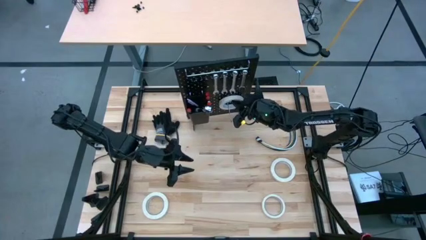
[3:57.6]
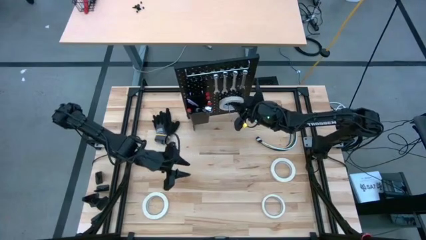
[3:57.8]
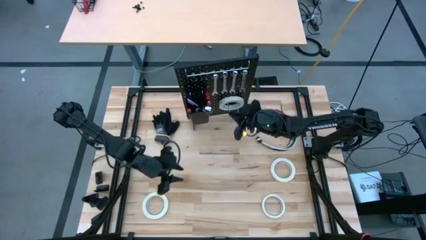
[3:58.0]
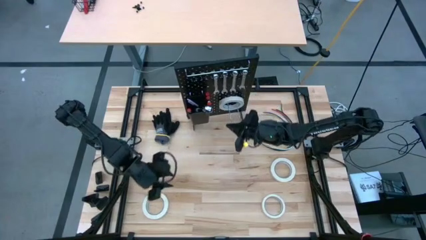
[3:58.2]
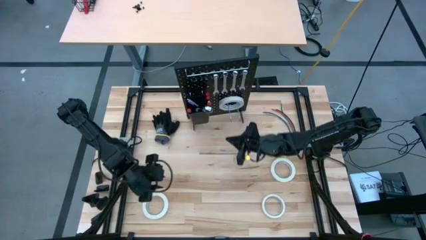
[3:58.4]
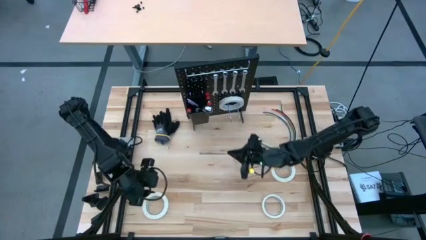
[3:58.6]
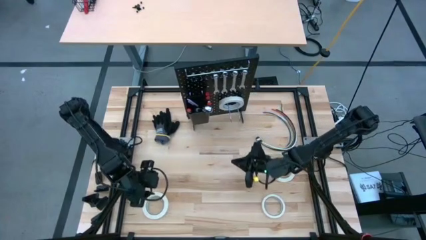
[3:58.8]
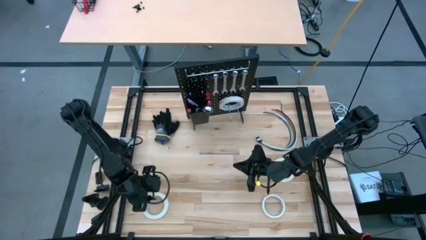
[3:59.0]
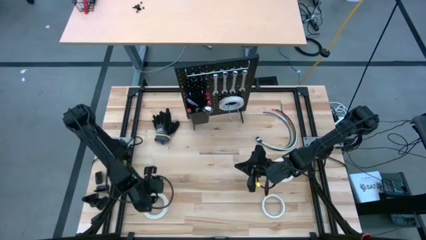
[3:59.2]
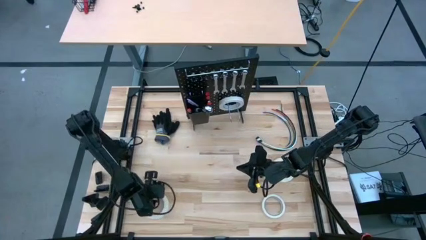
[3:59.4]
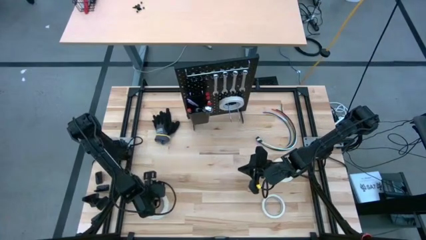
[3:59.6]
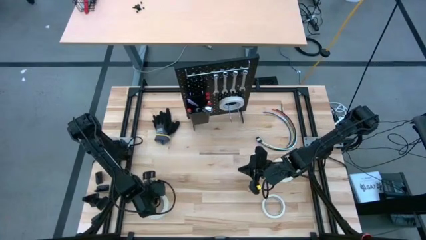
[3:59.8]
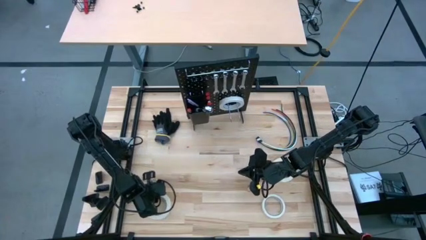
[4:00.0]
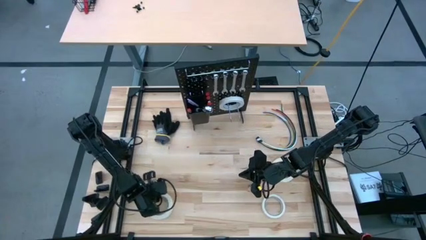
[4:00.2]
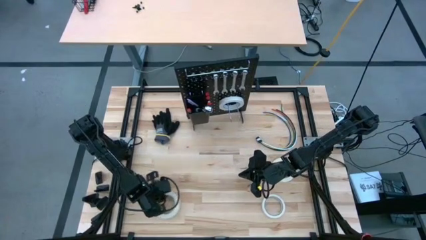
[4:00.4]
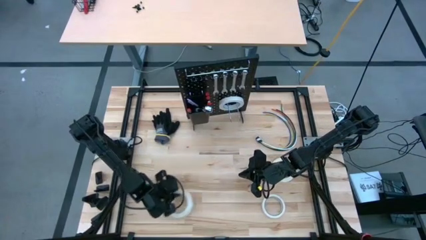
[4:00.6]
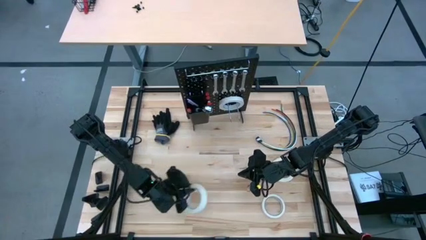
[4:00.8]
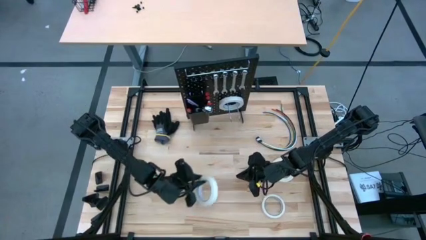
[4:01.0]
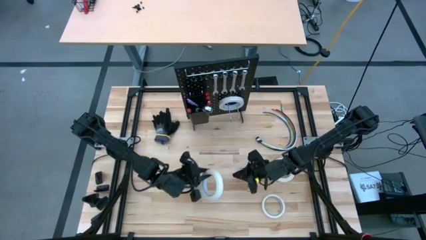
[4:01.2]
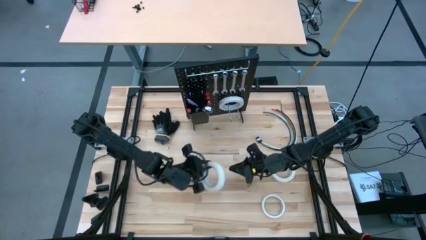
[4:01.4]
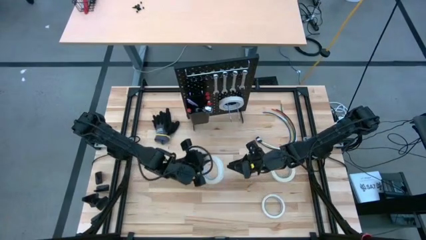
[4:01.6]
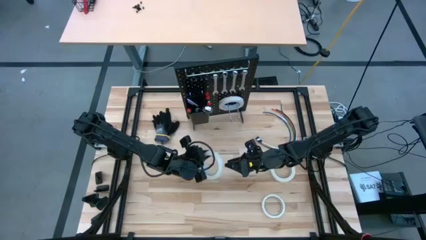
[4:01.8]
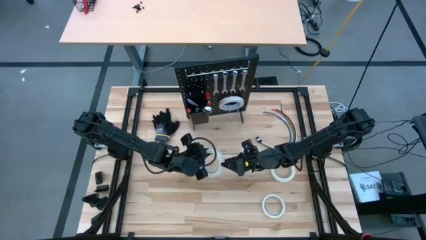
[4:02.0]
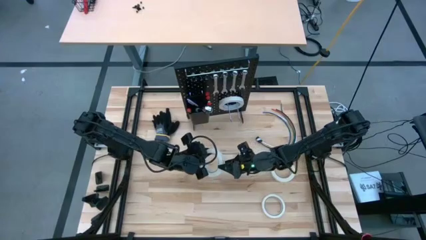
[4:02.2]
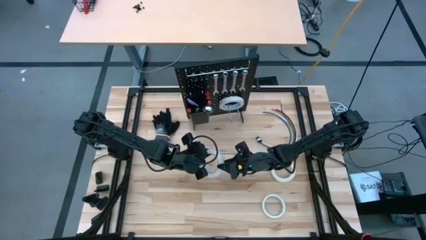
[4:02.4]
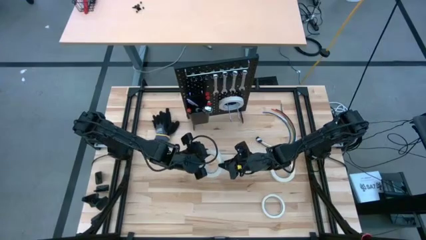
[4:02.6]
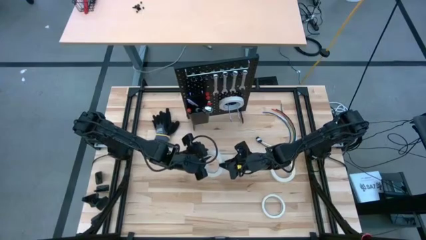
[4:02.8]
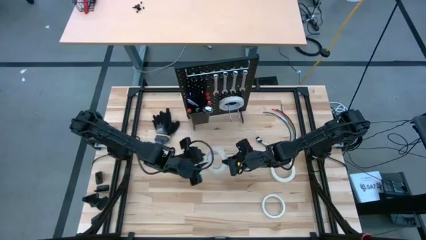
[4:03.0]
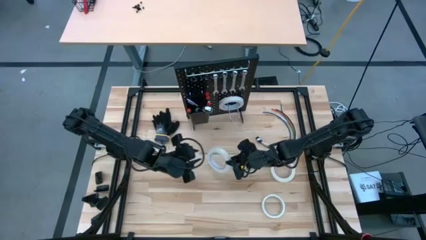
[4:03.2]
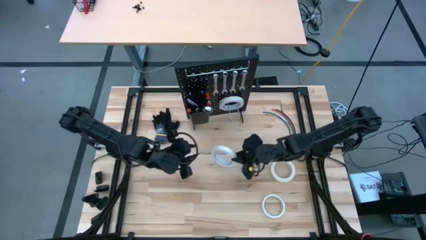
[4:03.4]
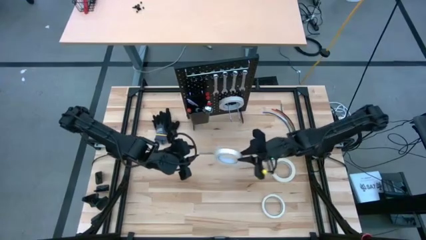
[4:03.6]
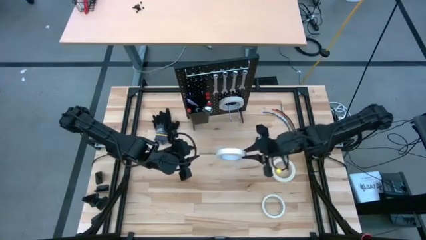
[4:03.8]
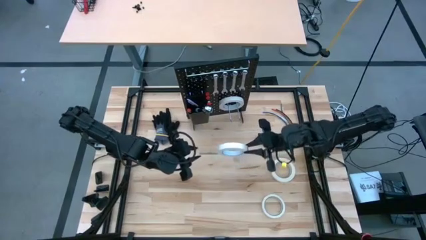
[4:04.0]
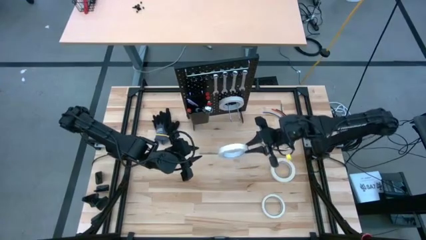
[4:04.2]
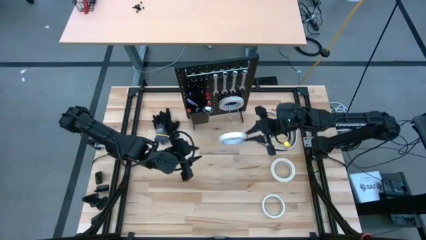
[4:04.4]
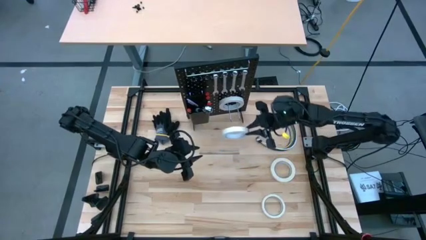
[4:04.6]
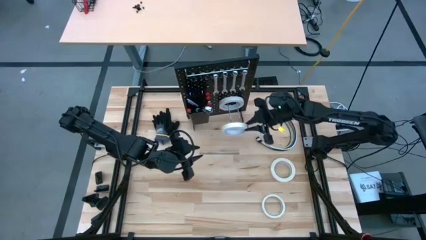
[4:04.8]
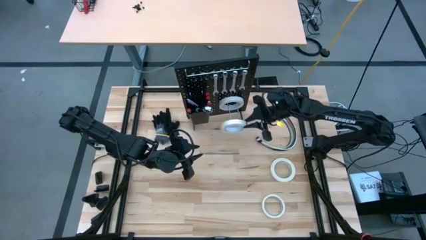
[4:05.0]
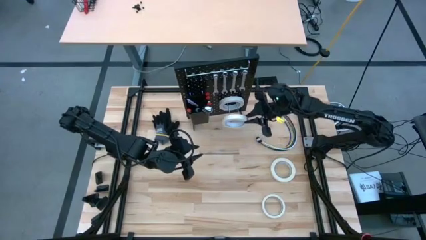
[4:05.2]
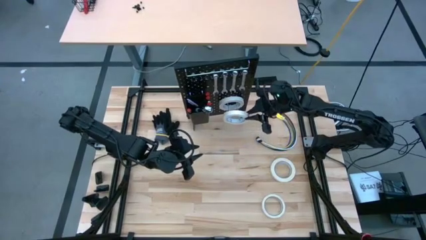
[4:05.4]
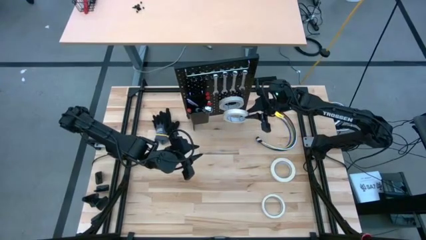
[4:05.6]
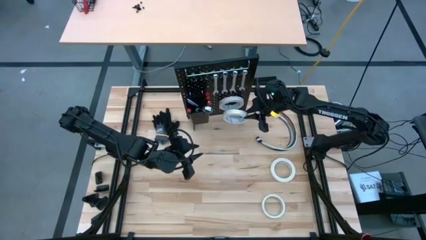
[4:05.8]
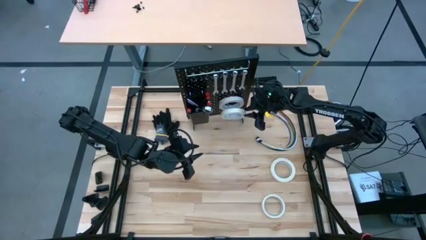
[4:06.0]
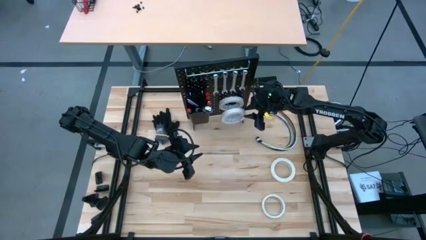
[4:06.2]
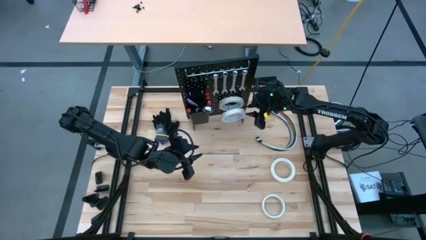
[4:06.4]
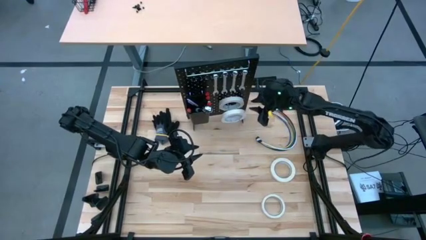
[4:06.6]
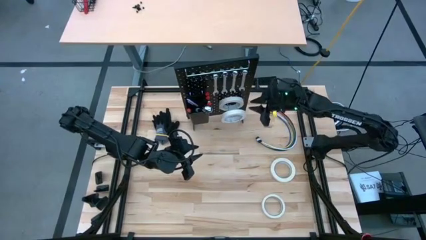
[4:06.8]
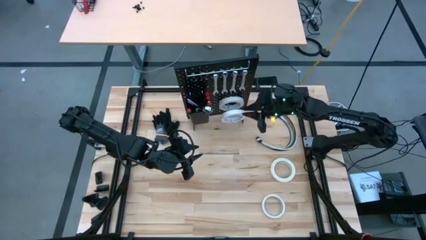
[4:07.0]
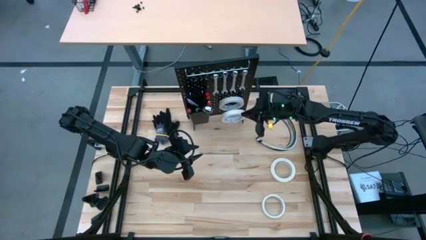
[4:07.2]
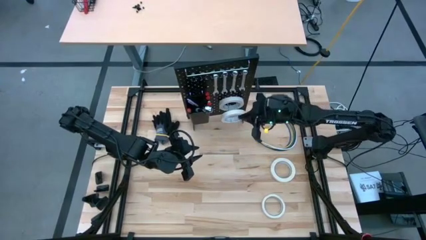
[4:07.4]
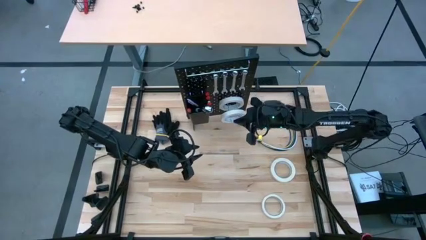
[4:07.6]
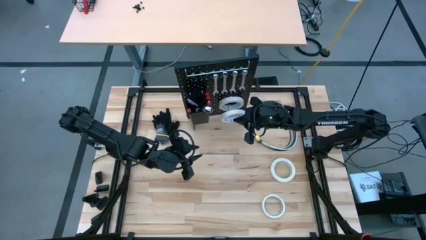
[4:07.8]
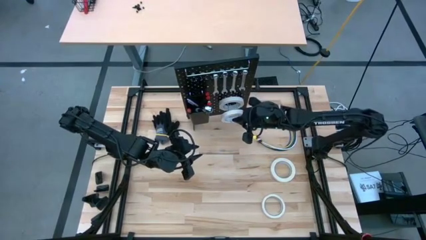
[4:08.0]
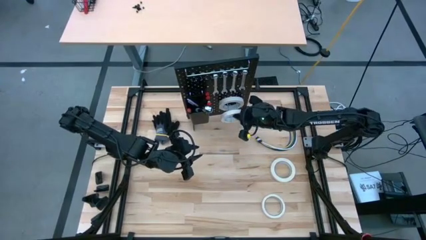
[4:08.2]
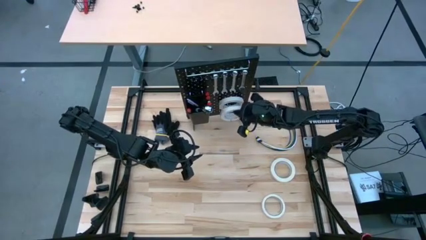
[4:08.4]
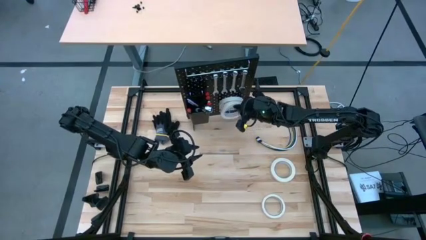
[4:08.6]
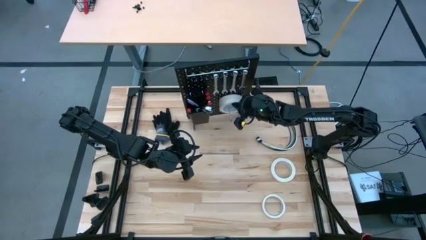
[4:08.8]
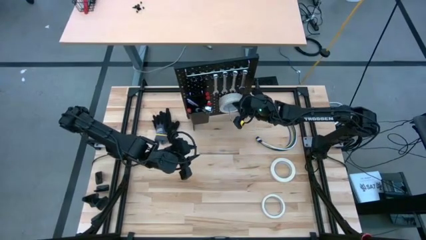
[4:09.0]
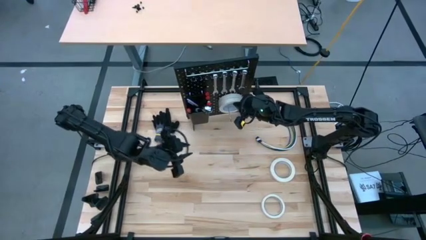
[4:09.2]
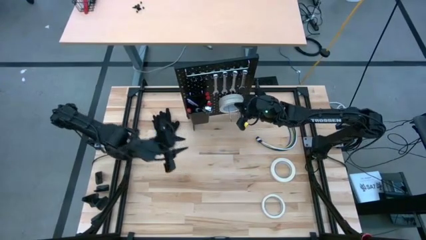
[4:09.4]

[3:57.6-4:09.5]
Task: Hang tools onto peg board
Hang the white tape on the peg board

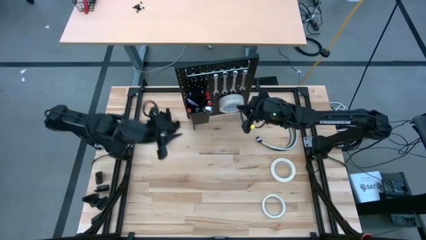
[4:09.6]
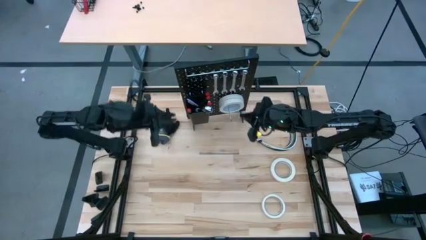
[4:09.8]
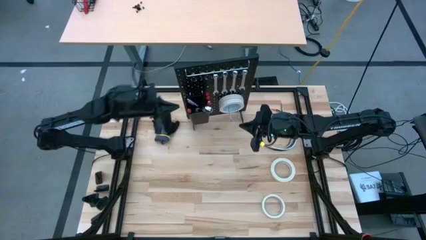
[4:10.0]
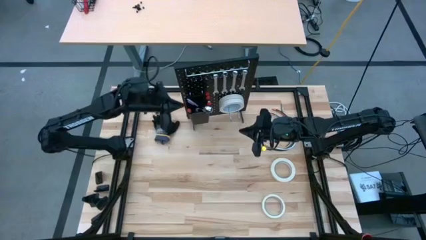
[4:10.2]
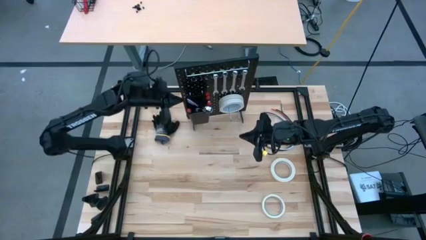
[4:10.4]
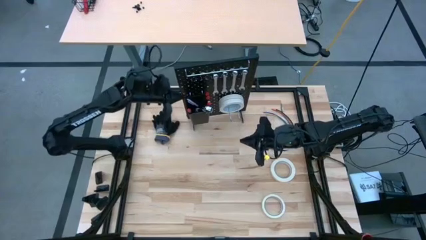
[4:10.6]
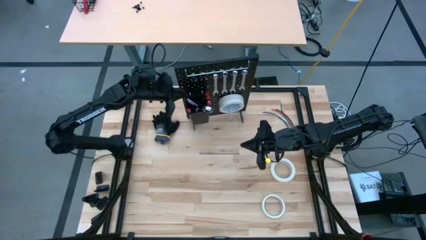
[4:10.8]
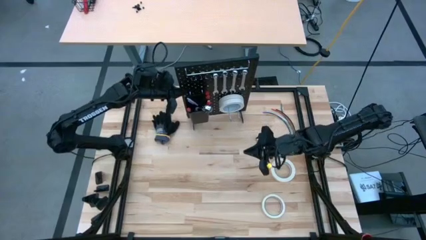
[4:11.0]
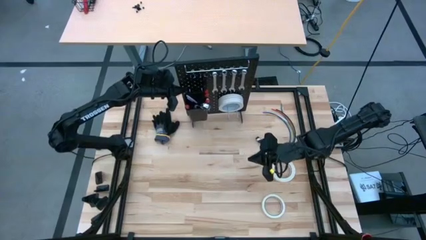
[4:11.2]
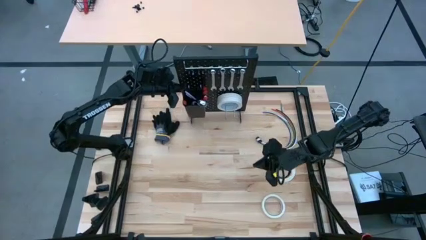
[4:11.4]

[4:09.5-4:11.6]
Adjust the peg board
